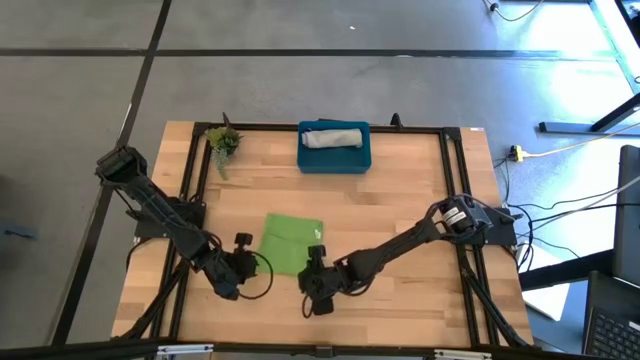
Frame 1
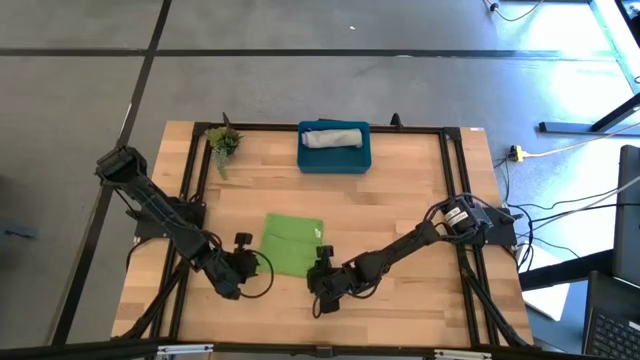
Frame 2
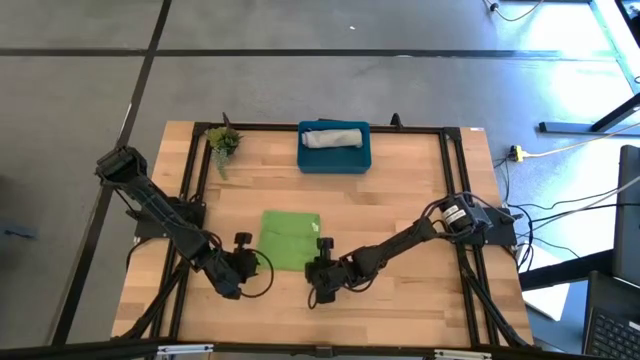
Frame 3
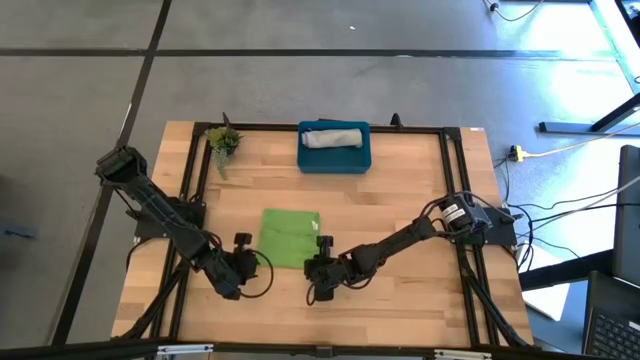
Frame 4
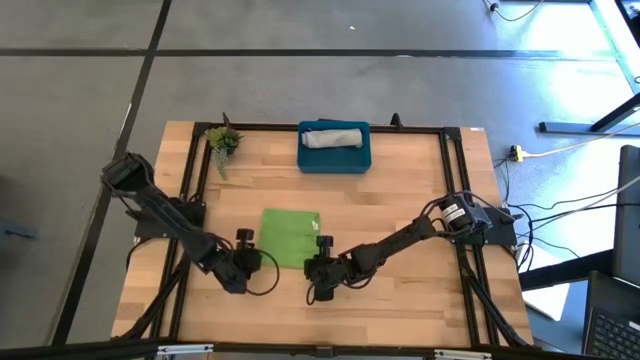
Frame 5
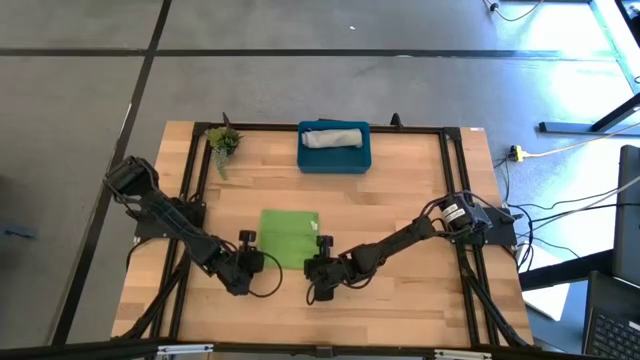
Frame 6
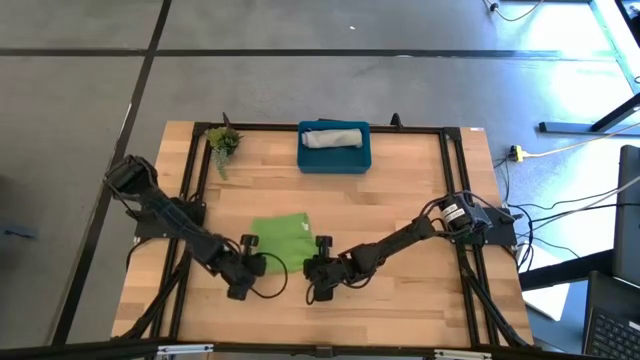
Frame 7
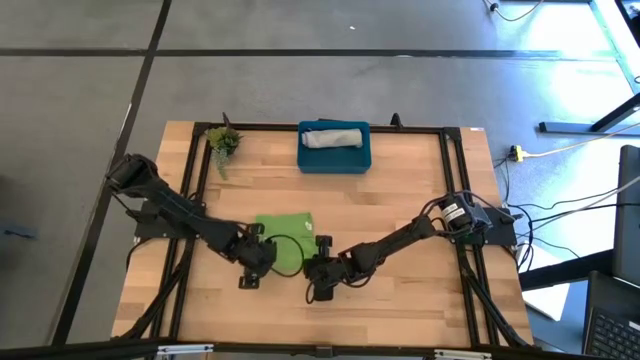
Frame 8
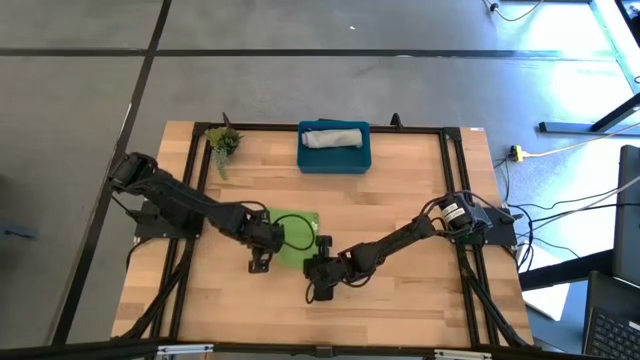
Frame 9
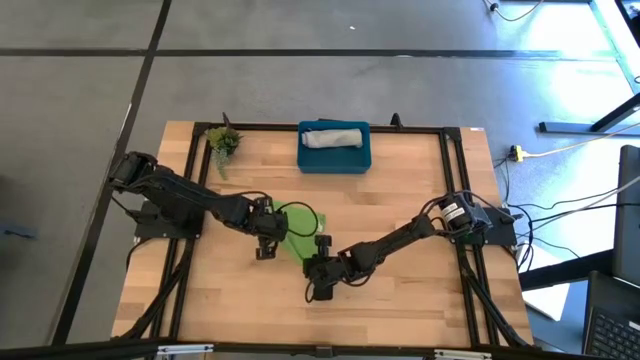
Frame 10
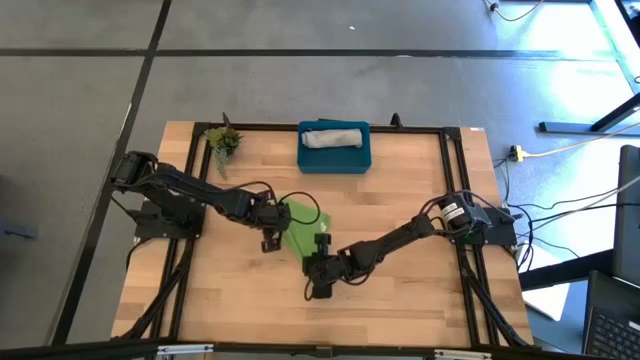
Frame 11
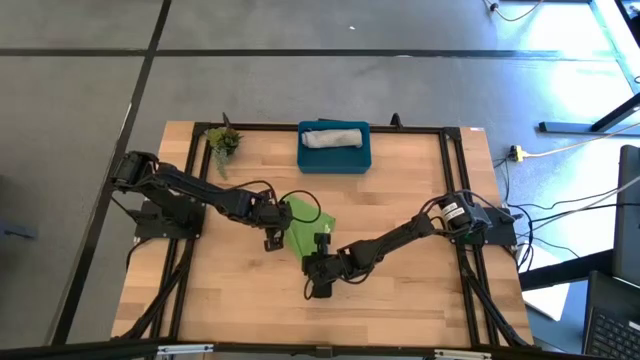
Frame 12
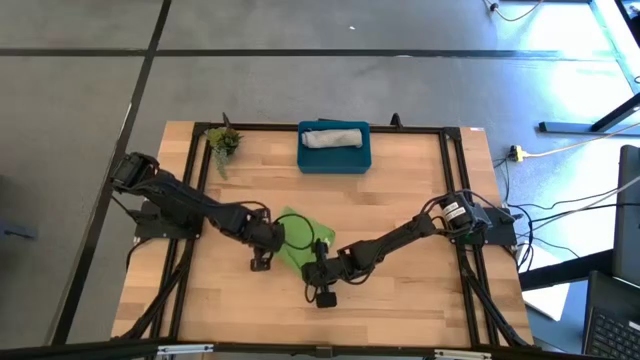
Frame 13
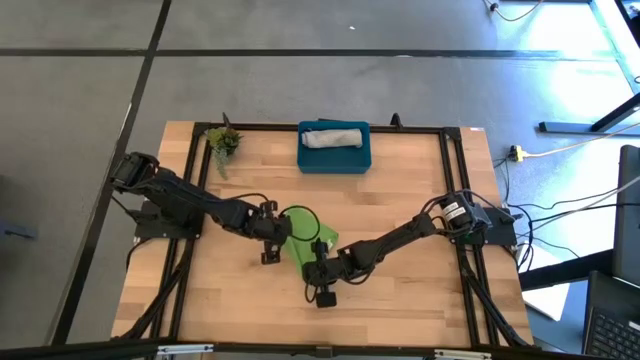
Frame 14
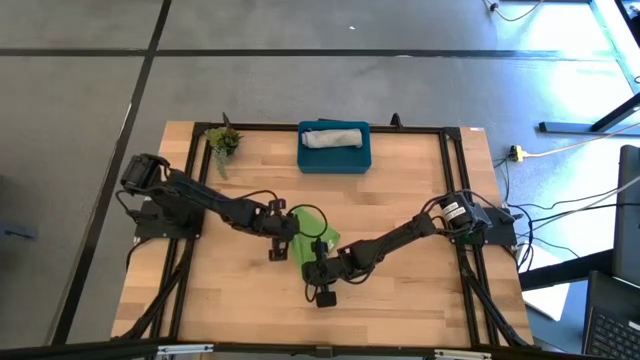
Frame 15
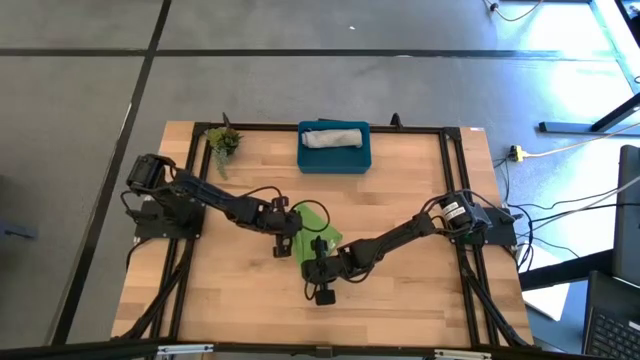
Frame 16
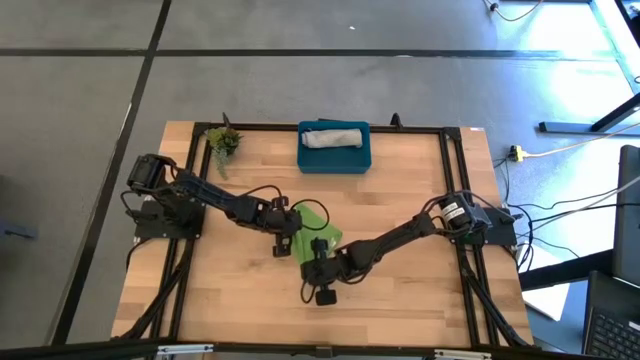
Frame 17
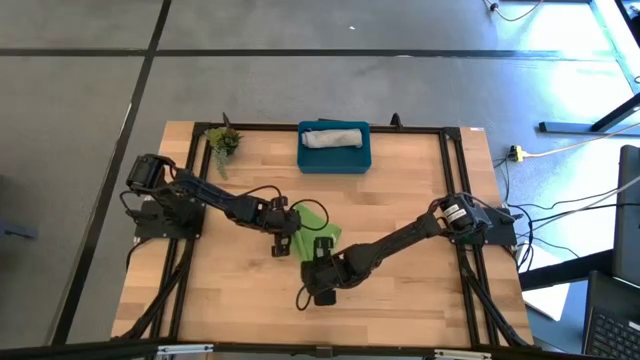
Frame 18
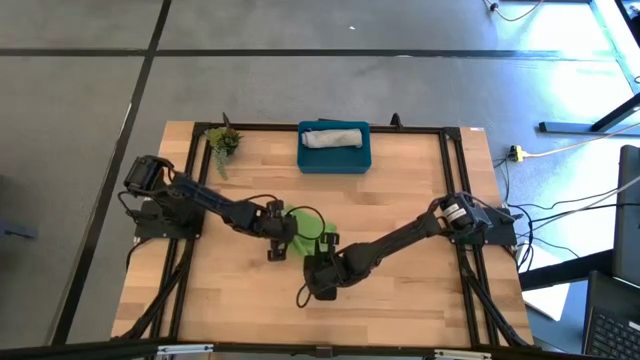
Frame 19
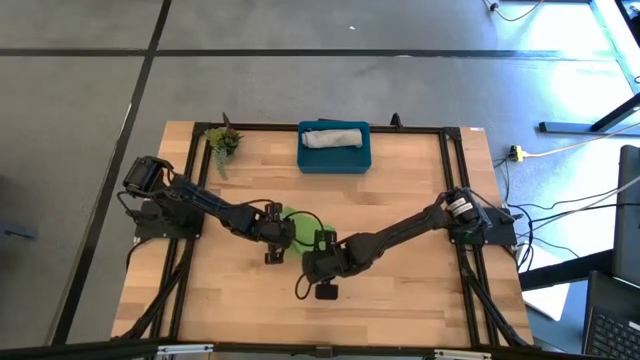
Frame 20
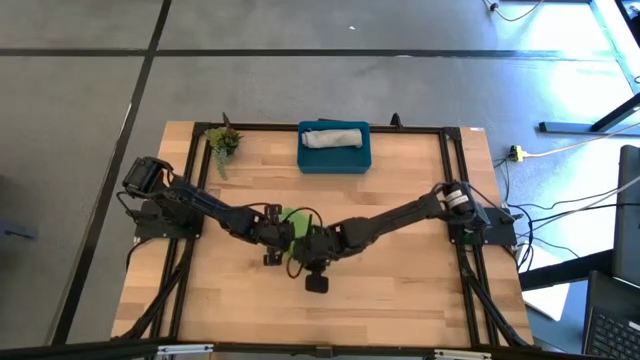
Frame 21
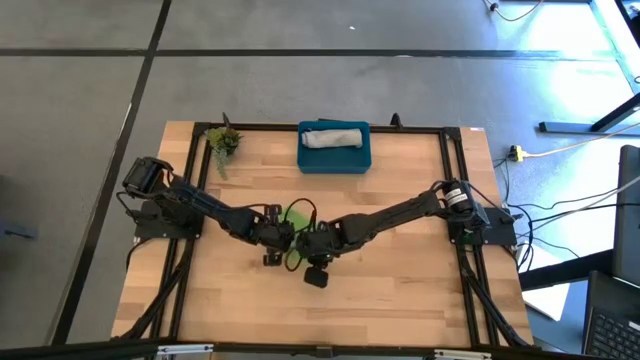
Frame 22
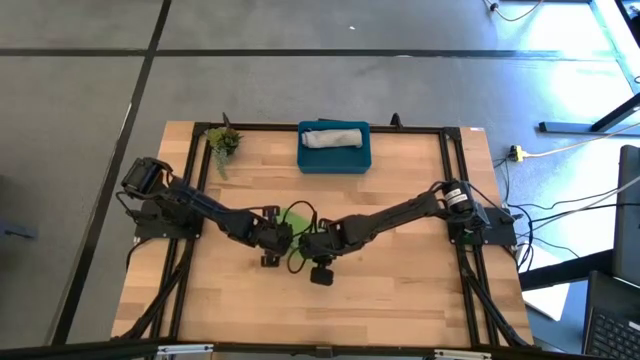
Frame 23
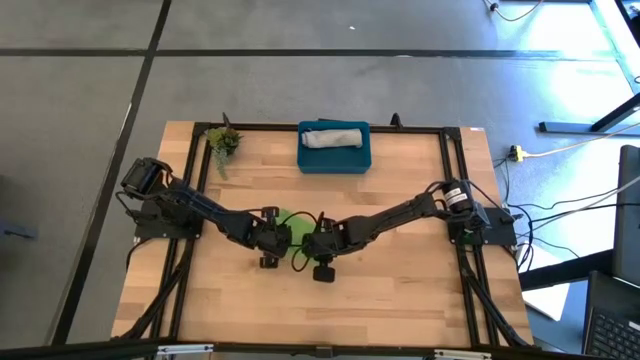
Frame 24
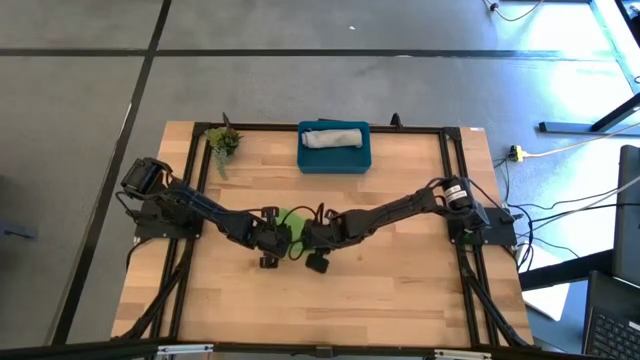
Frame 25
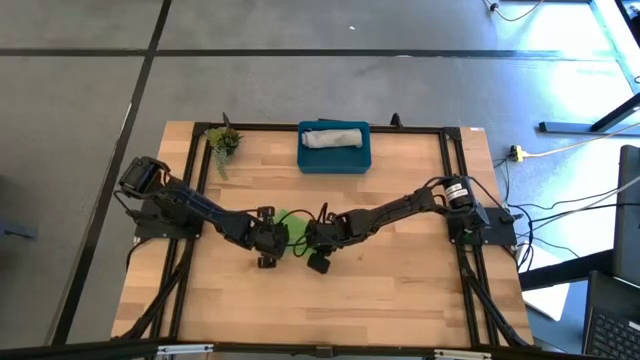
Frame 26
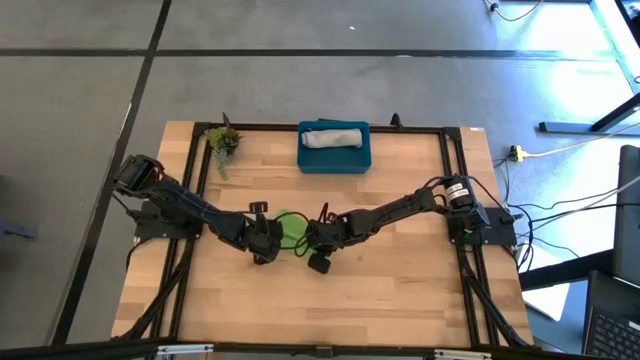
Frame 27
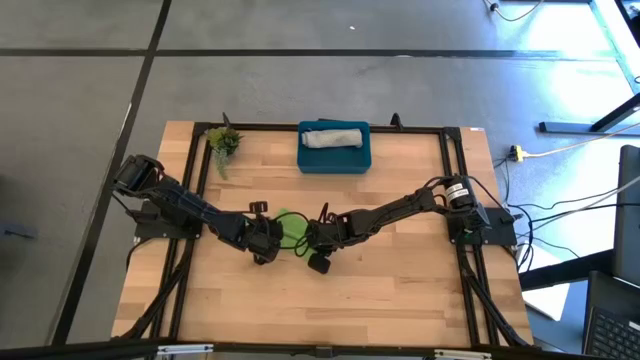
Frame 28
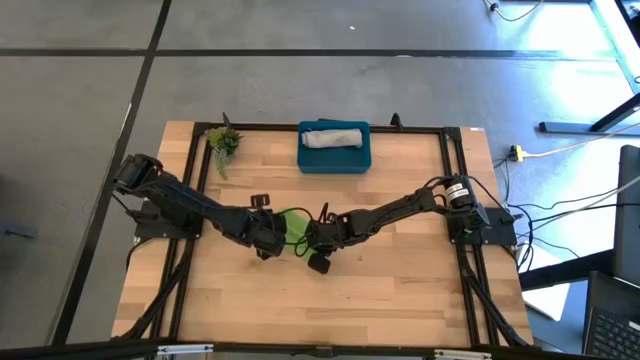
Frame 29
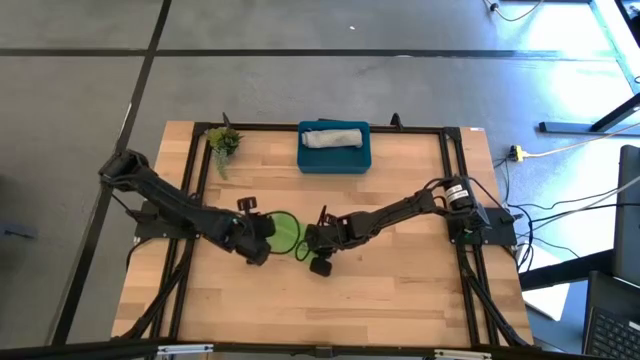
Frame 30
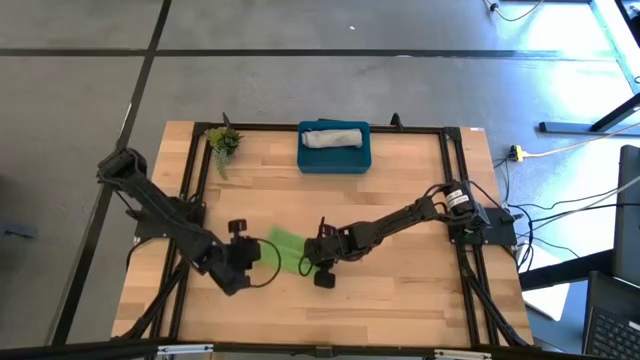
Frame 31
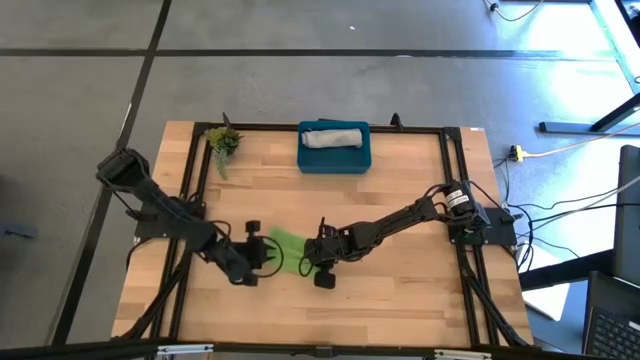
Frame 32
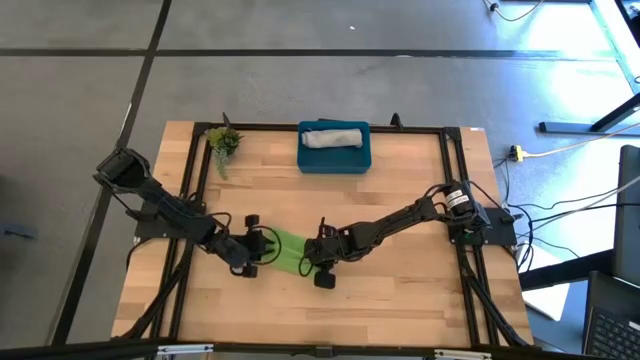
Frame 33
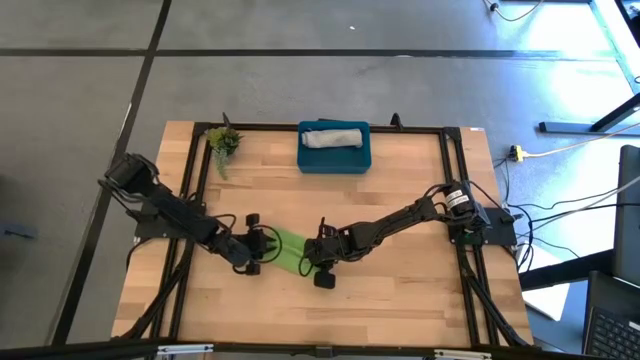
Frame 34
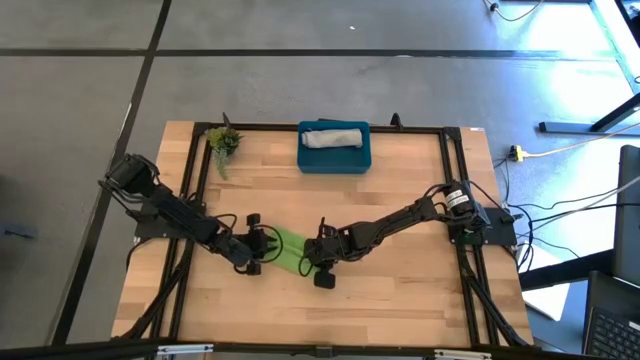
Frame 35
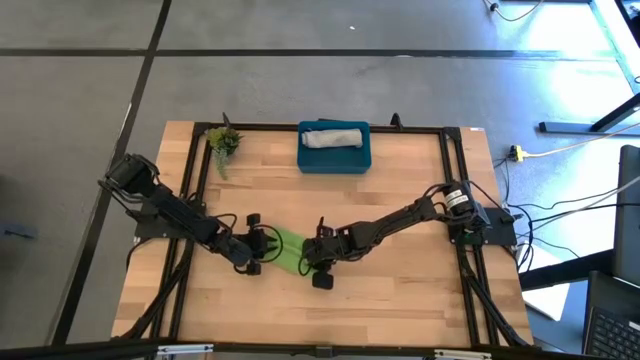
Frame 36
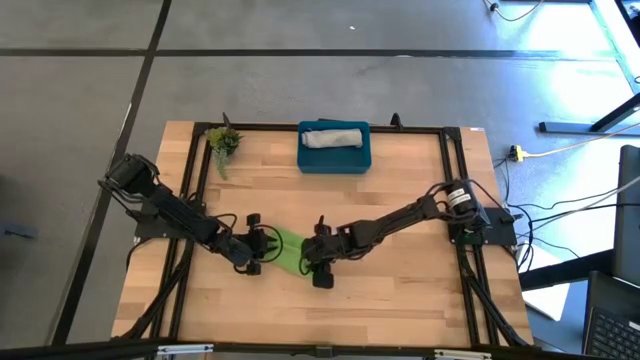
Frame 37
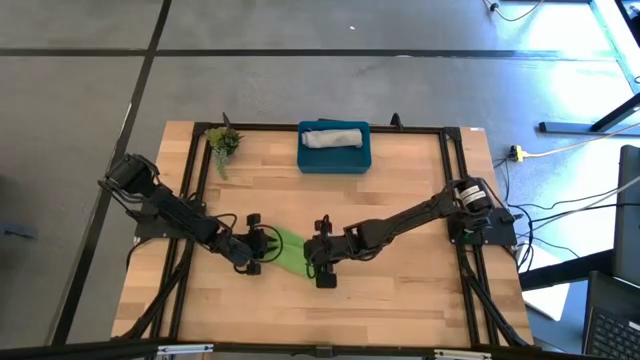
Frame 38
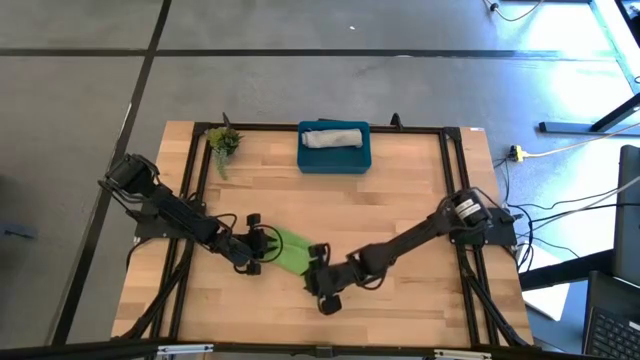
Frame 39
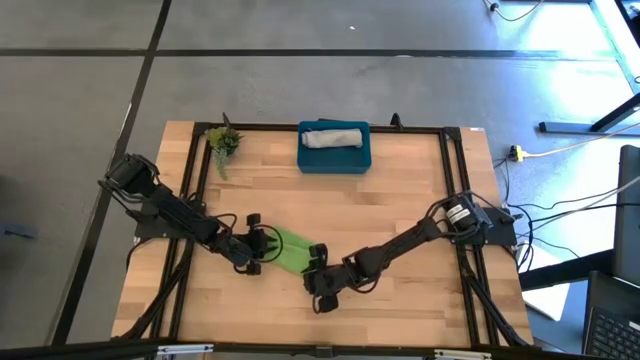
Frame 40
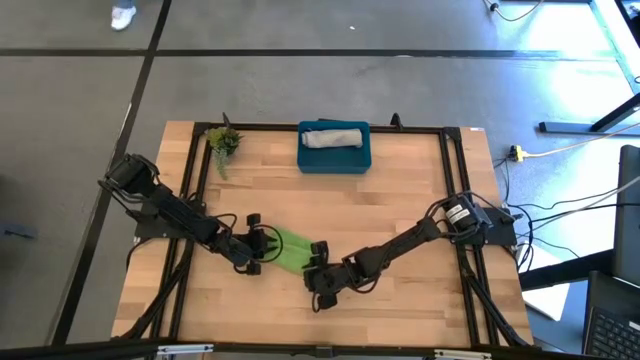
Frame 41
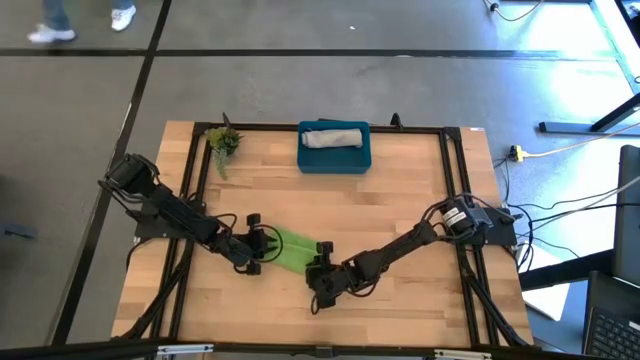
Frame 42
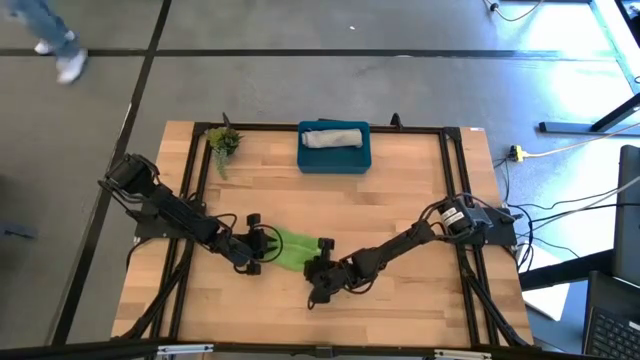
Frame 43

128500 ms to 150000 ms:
Task: Roll microfiber towels into tight, uniform cylinder then place into a basket
Roll the green microfiber cloth

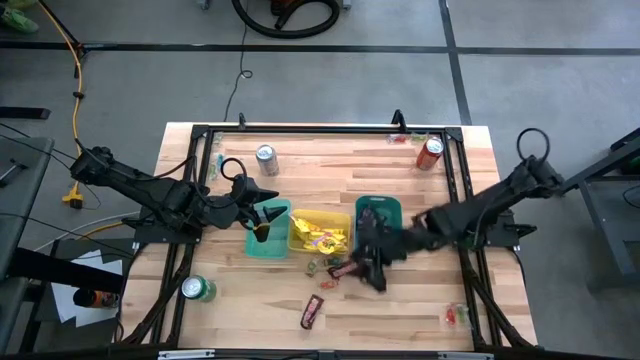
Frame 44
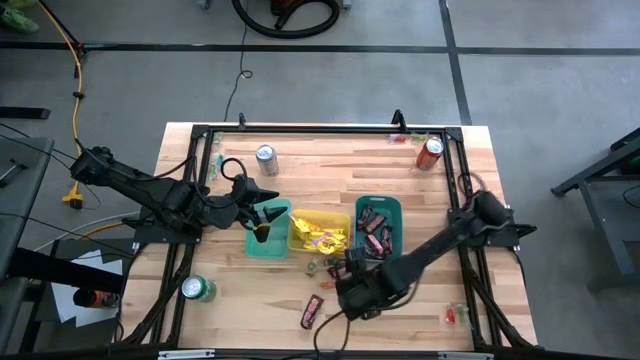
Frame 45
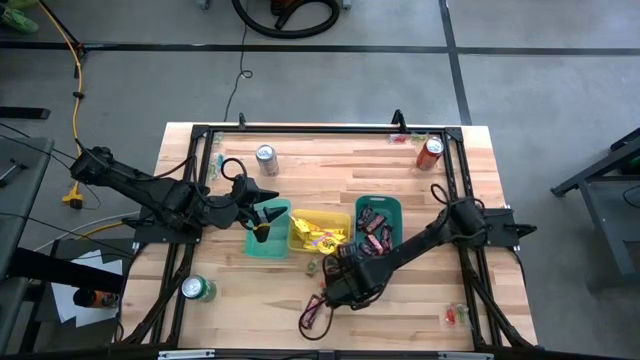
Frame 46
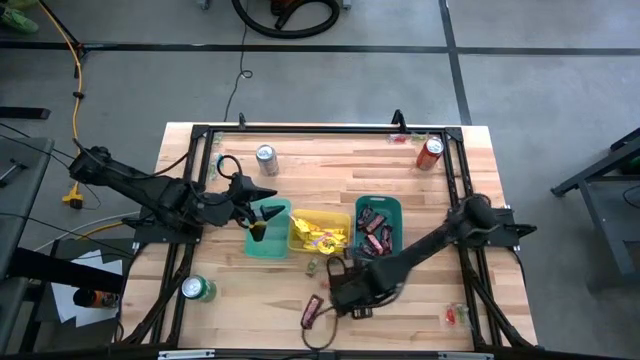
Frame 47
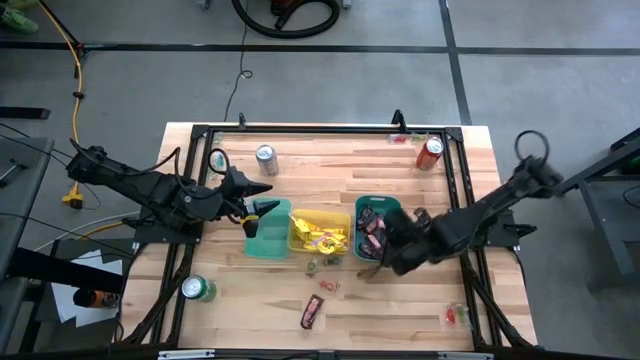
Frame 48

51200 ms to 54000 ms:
Task: Sort candy
Put the brown chocolate into the blue bin
